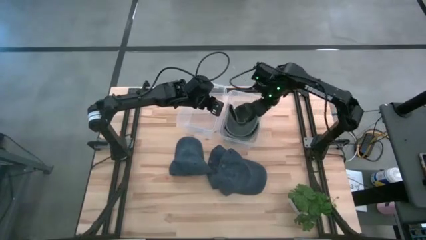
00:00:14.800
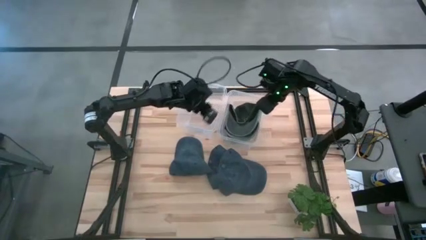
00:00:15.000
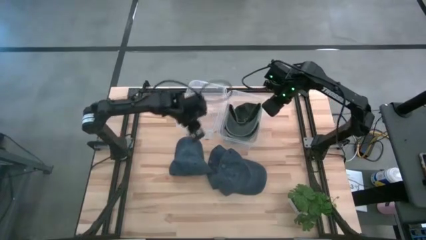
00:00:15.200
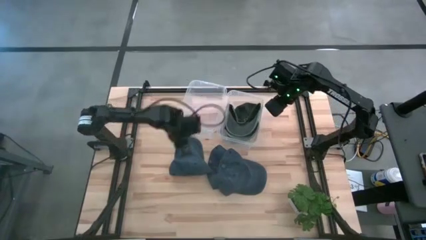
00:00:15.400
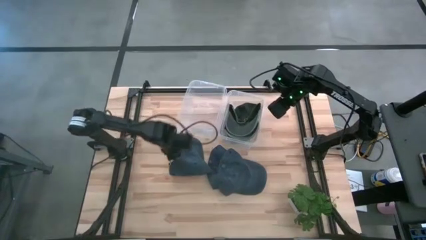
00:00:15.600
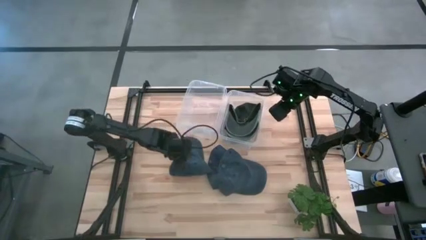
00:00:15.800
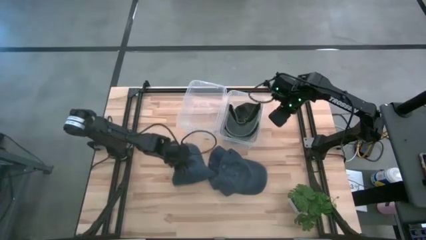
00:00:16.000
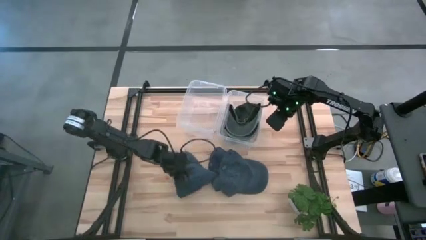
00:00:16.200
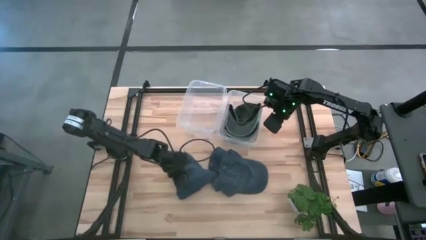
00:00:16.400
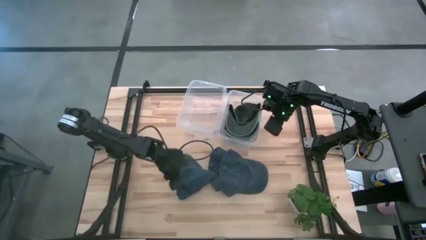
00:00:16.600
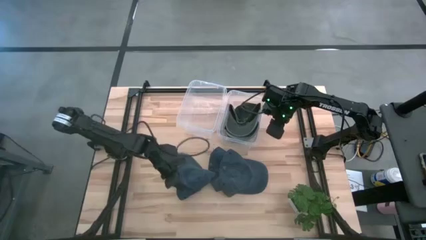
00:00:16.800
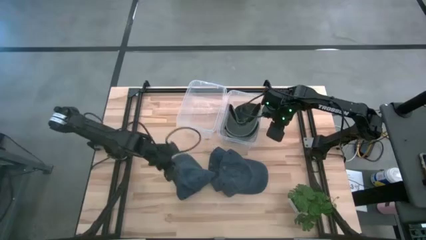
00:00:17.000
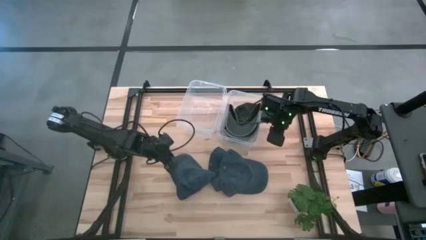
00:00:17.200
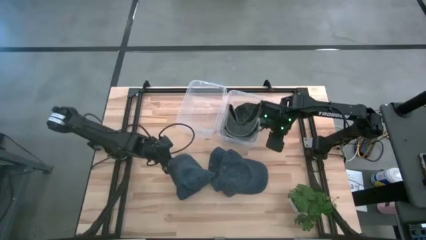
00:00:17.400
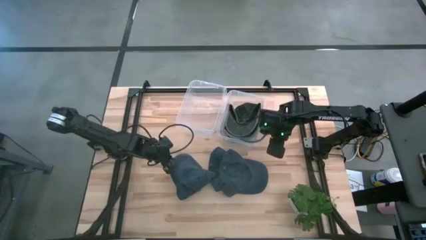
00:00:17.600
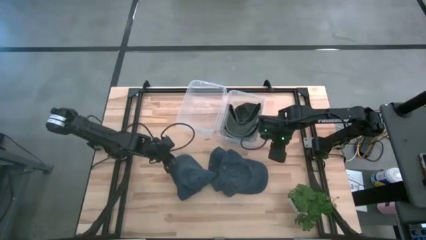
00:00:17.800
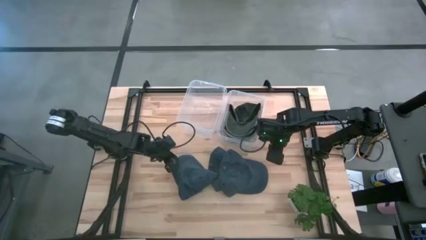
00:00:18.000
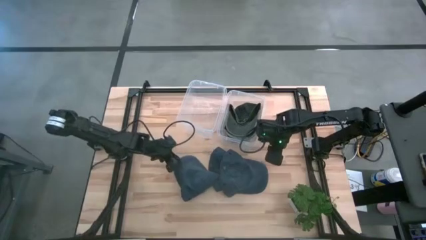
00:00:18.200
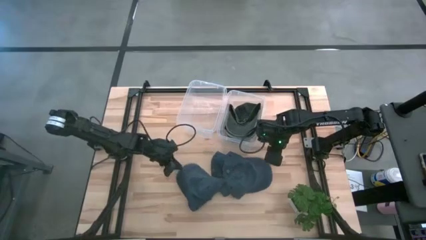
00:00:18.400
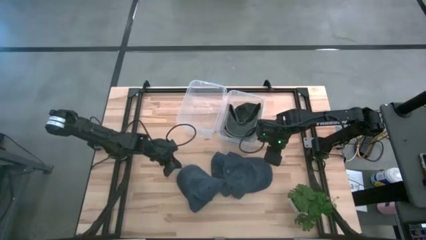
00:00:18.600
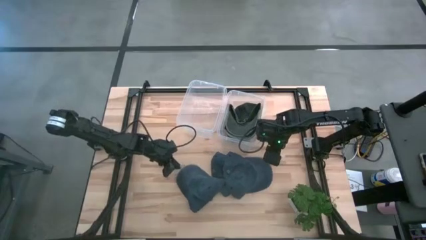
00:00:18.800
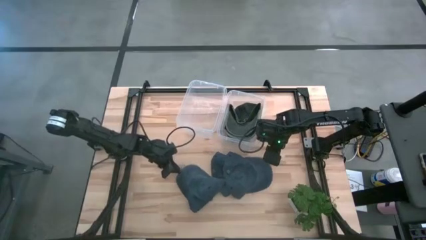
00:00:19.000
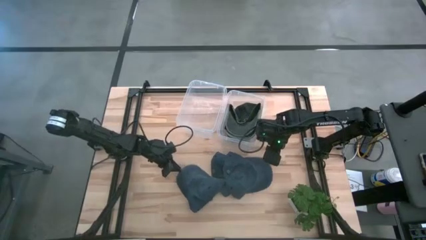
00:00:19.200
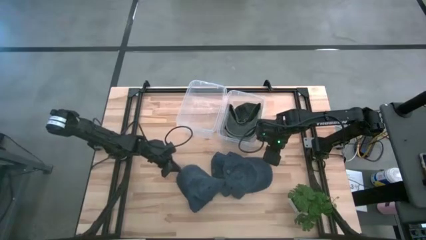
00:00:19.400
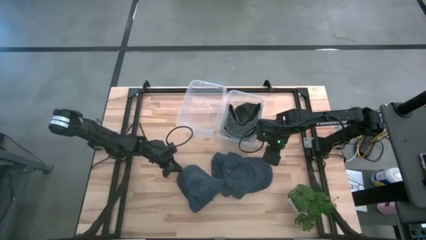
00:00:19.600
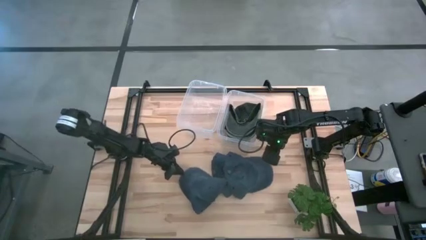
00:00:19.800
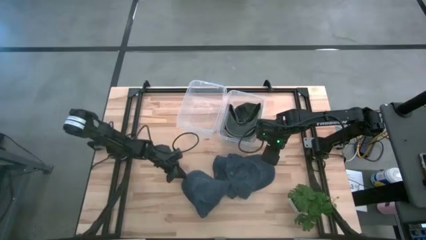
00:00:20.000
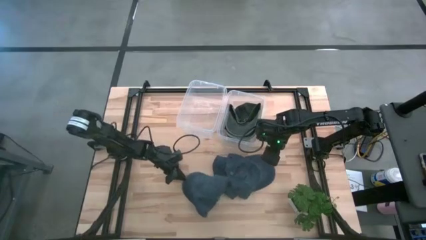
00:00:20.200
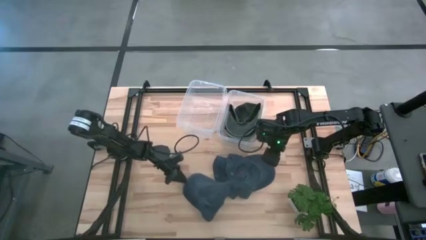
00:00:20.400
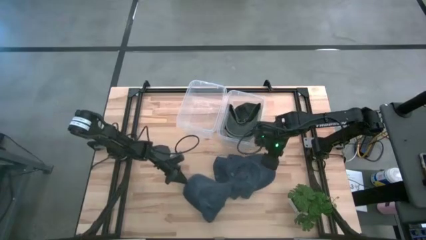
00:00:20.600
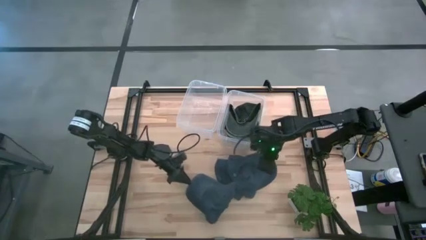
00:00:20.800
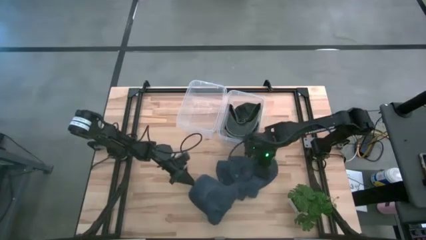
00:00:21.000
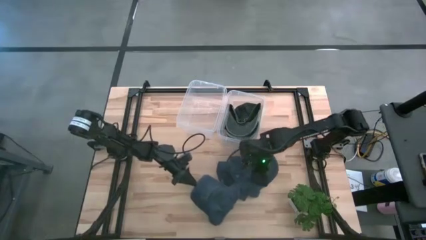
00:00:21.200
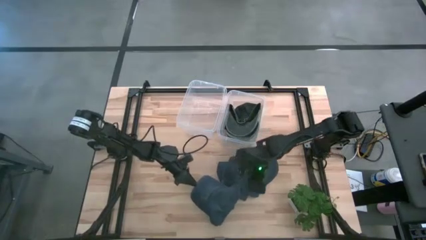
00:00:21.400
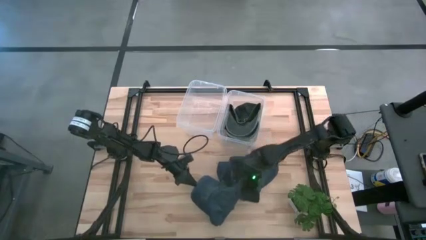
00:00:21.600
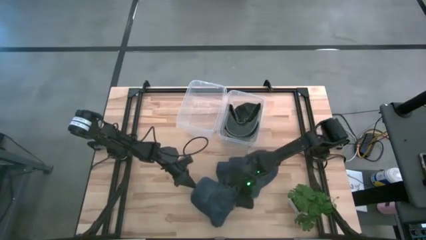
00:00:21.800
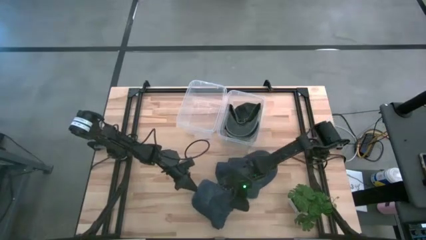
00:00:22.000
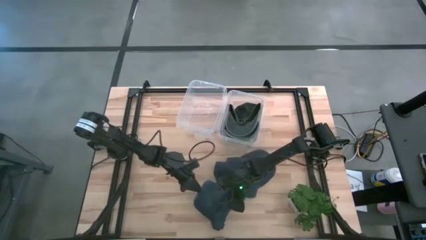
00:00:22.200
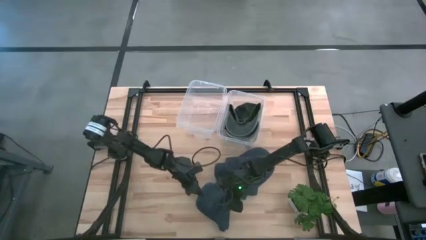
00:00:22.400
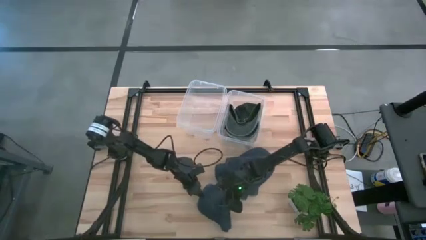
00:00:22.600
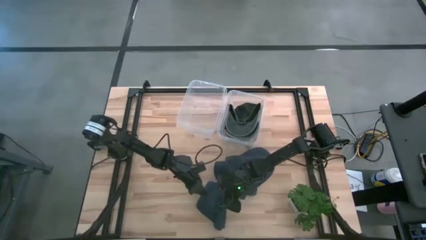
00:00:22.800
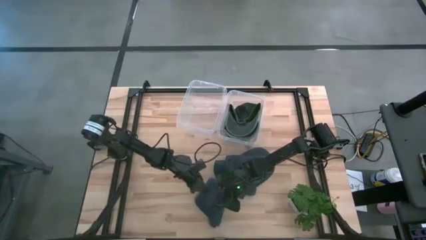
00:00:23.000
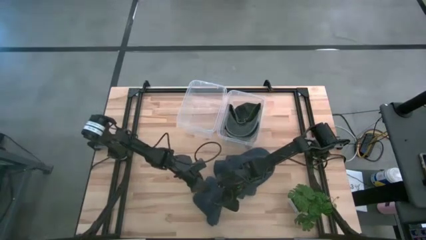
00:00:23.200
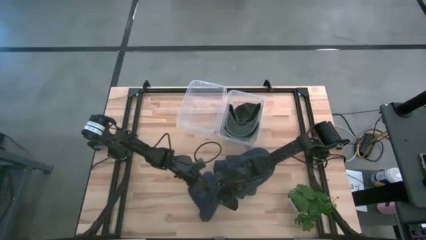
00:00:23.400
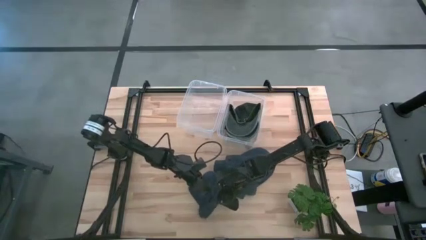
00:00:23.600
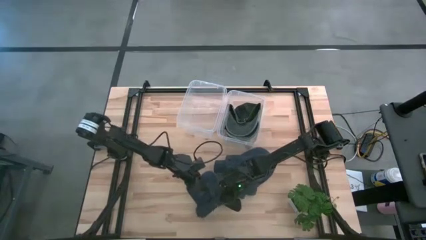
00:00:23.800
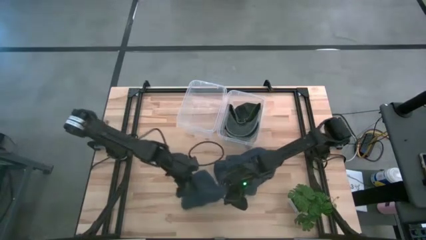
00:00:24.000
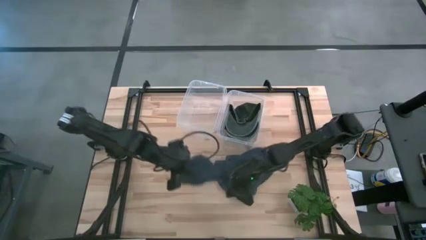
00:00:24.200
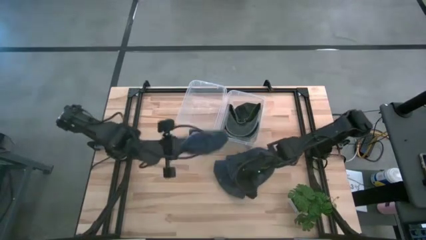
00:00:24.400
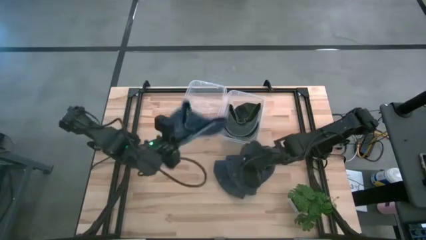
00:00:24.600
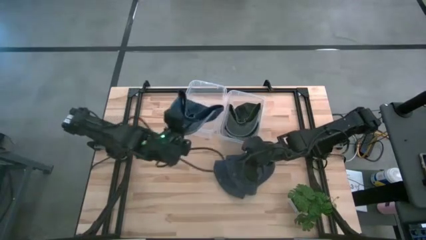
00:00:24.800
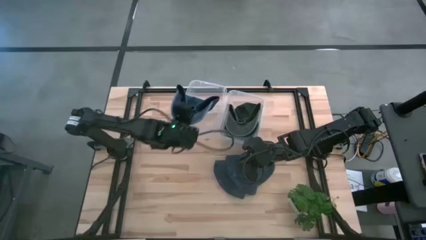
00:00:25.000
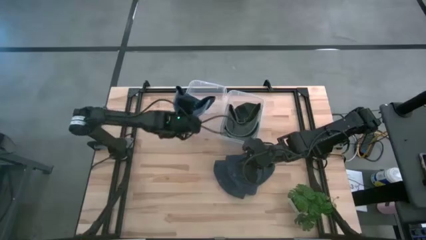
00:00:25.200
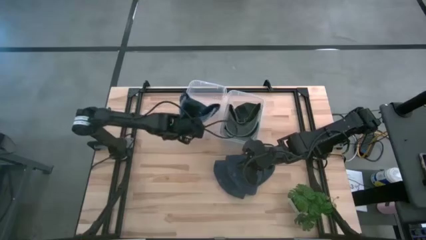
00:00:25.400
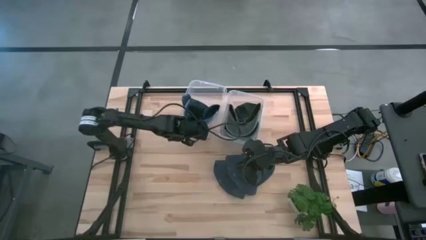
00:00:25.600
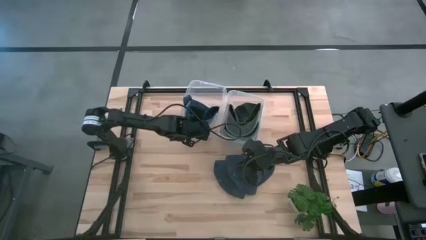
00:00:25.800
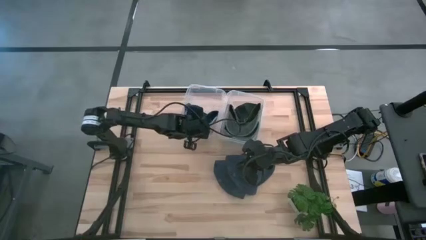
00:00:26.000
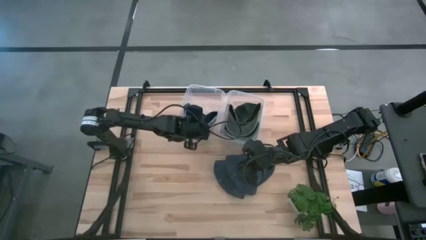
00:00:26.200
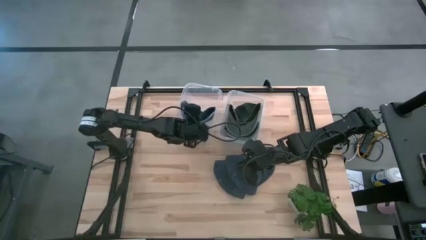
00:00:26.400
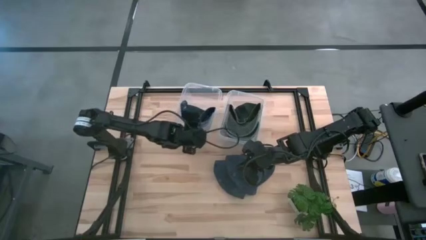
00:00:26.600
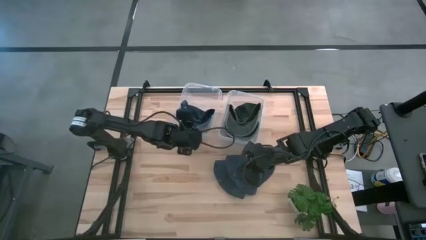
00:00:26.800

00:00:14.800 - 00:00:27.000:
Task: Pick & Place hat
Put the left blue cap into the left transparent bin
